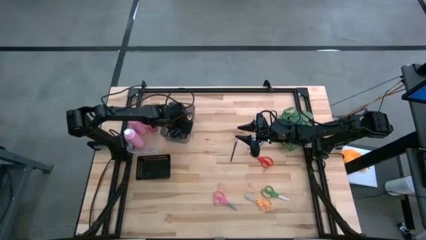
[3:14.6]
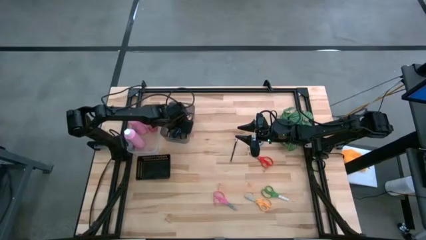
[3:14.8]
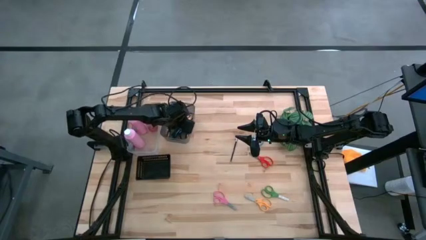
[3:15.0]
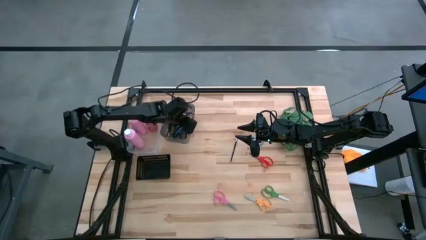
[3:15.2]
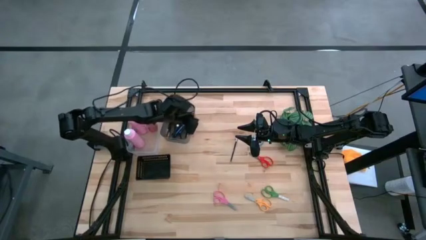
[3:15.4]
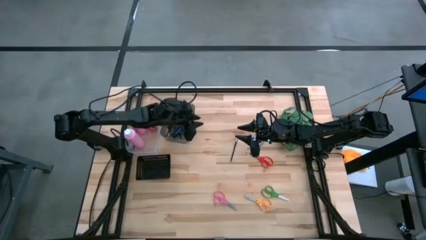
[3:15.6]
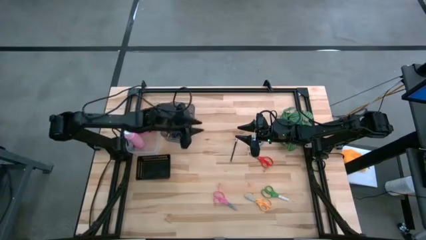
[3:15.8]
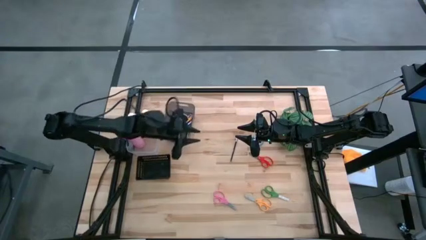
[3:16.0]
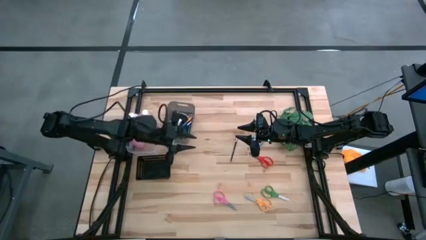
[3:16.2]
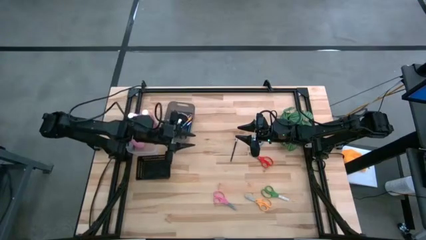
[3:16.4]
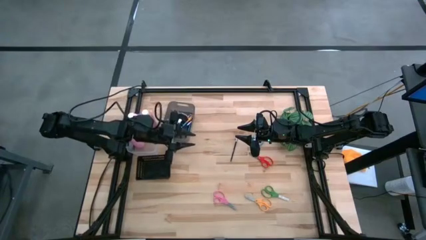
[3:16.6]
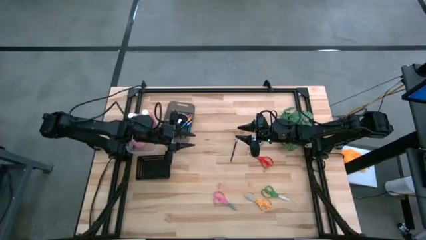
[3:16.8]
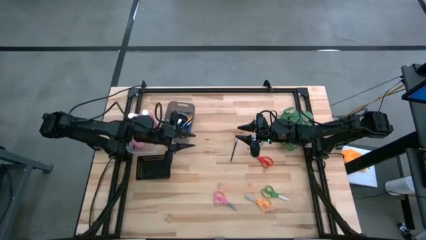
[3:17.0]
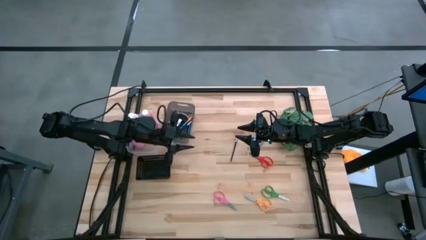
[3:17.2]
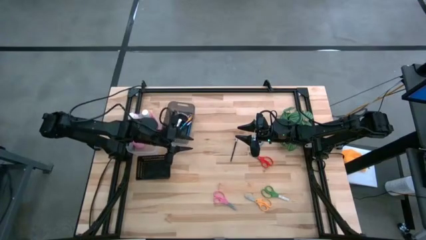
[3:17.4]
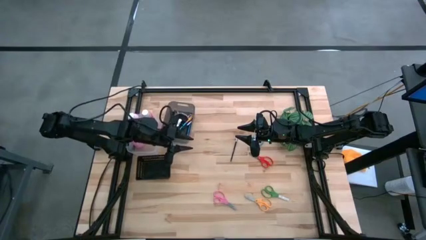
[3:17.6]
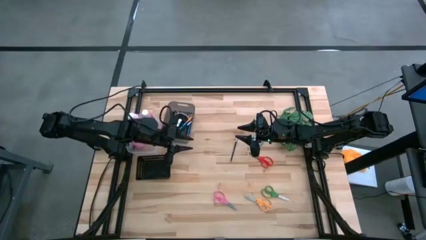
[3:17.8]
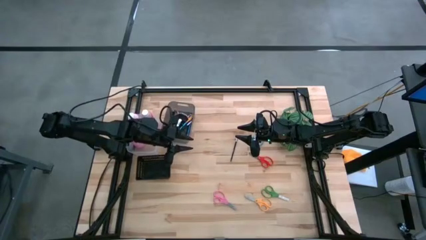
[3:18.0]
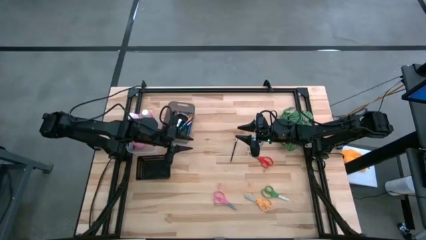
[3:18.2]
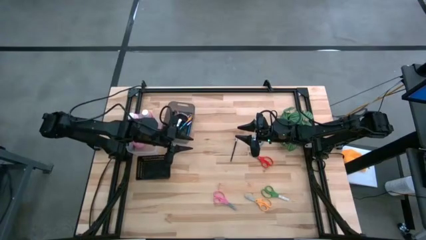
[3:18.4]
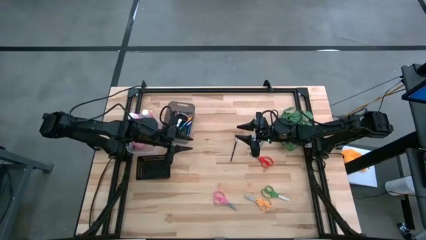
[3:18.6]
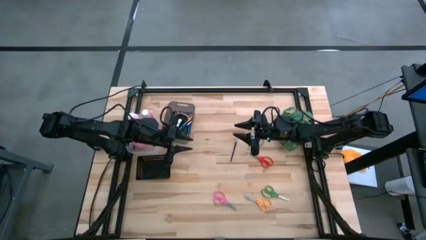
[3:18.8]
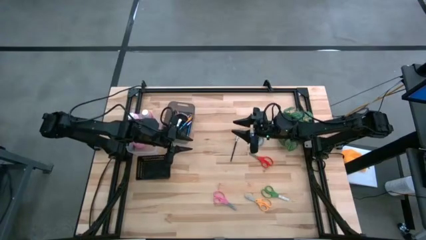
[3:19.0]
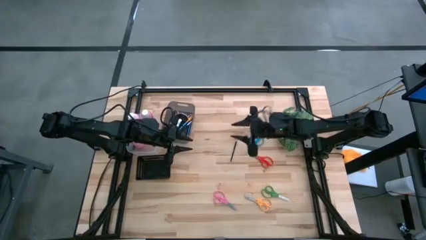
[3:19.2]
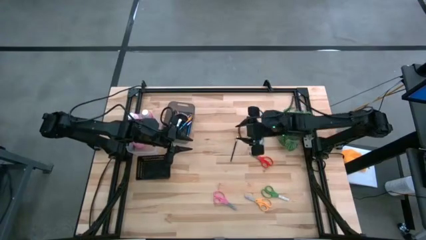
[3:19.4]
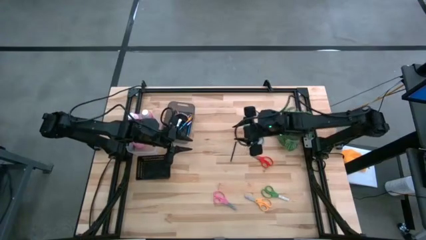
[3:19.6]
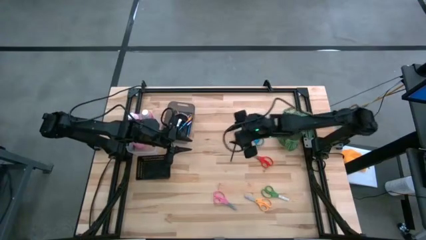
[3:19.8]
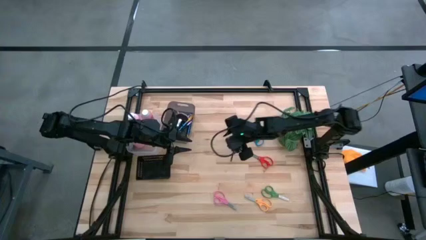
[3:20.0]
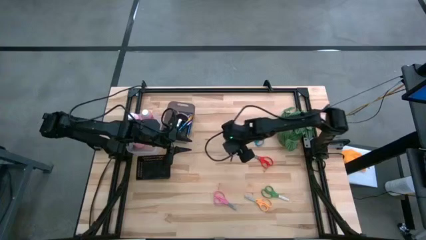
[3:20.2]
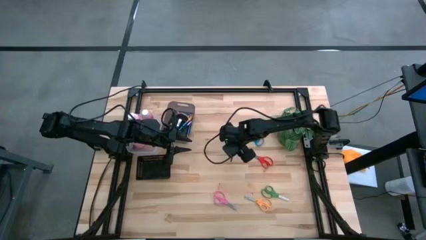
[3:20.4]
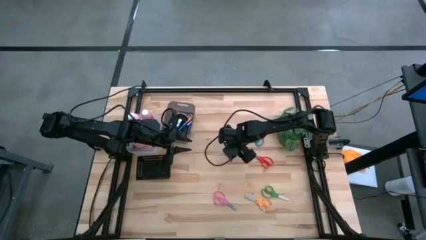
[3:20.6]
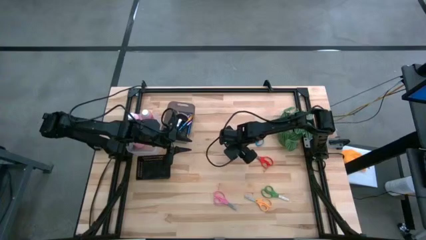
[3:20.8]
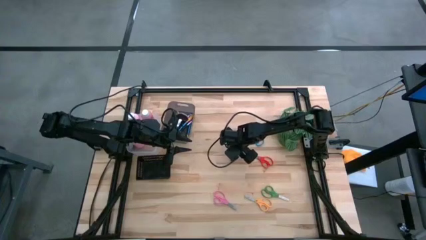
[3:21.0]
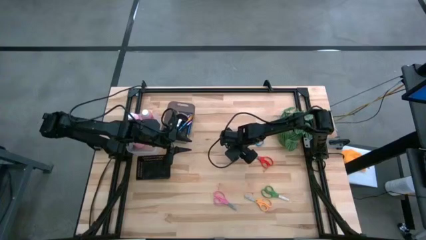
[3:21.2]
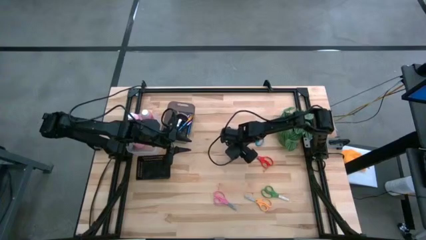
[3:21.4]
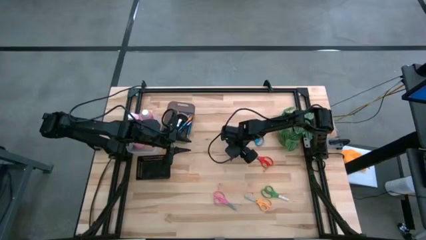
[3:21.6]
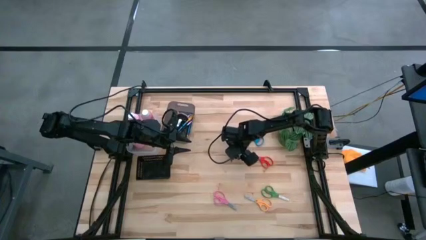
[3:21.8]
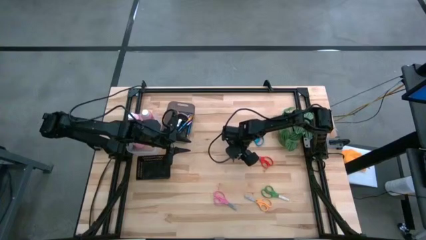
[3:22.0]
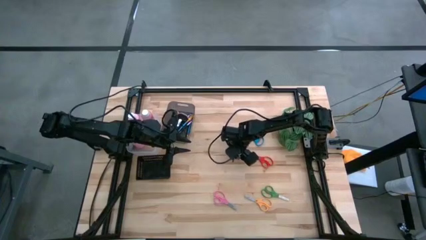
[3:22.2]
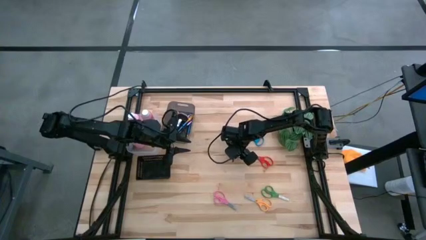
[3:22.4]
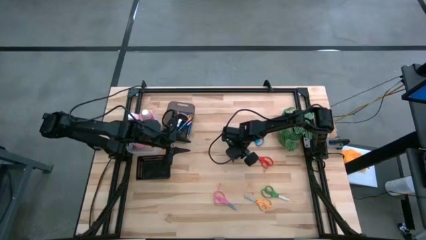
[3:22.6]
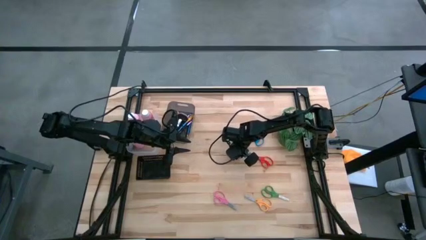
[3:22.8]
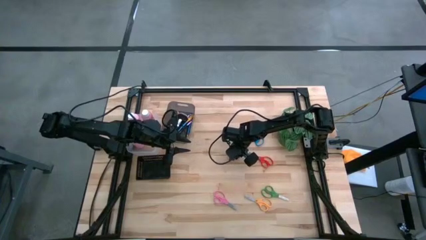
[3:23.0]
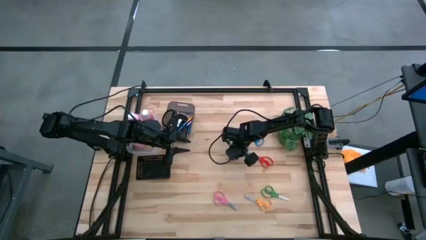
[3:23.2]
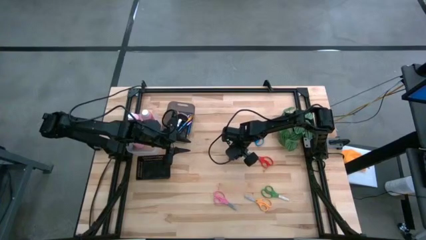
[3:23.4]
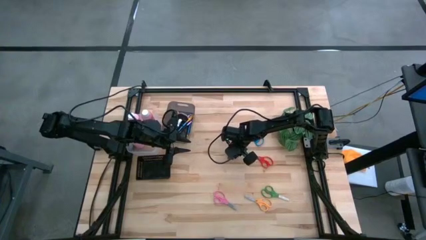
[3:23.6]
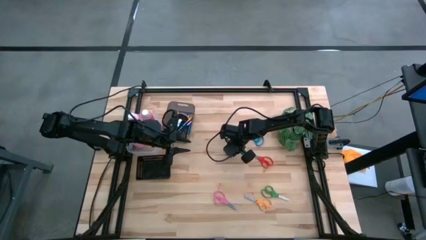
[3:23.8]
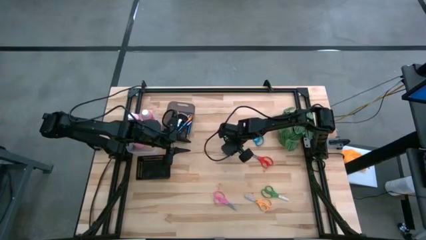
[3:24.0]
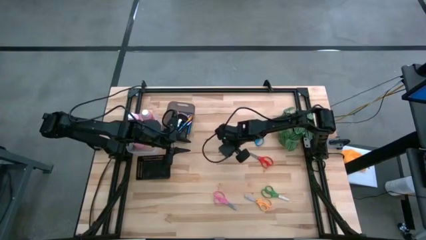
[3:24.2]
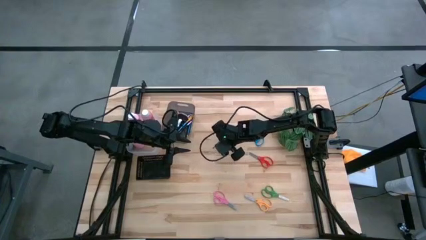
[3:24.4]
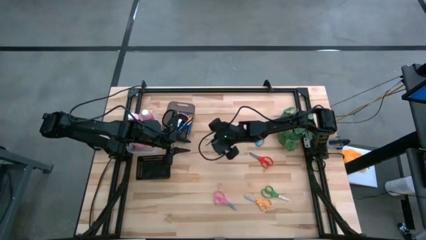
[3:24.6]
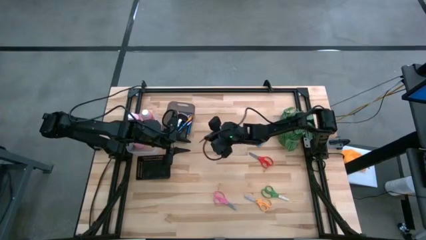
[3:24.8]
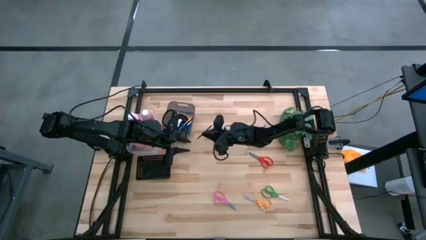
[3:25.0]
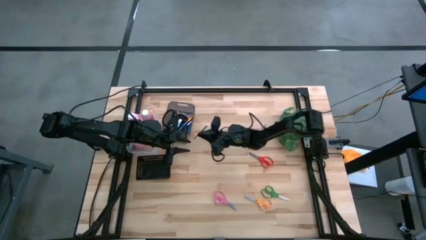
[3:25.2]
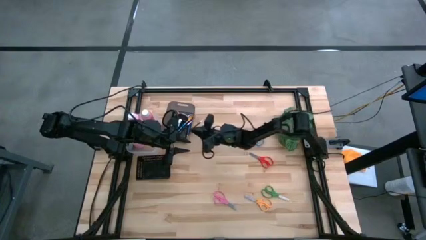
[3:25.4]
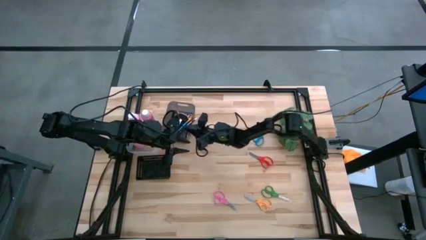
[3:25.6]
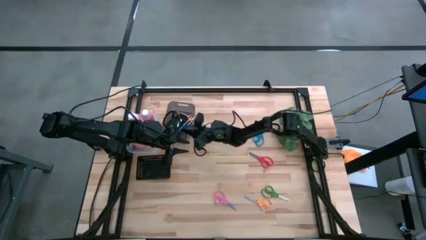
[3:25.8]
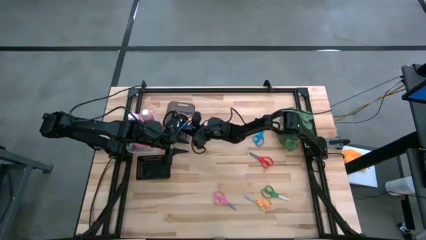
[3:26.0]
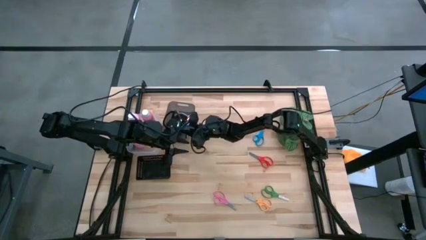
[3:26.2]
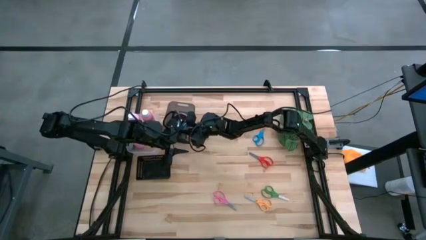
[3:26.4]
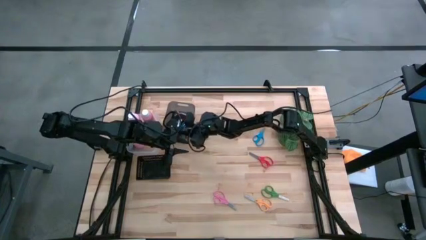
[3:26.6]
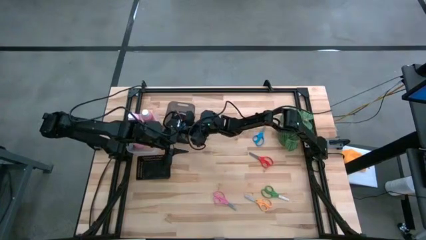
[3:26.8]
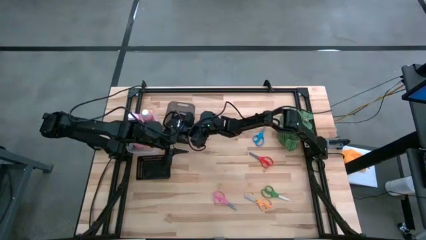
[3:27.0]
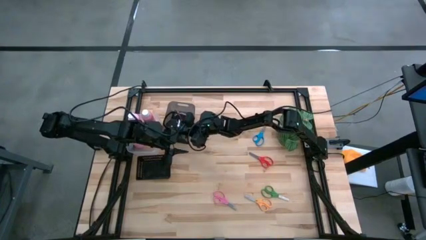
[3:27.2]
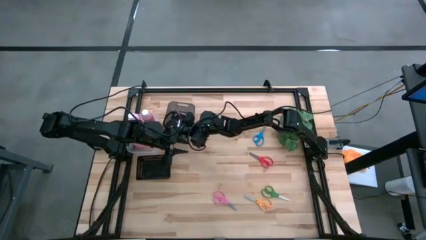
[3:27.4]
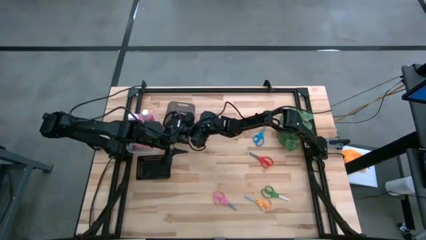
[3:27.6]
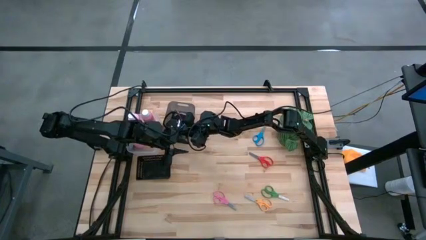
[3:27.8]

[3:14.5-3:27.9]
Task: Pick & Place Paint Supplies
Put the black brush into the black bin
